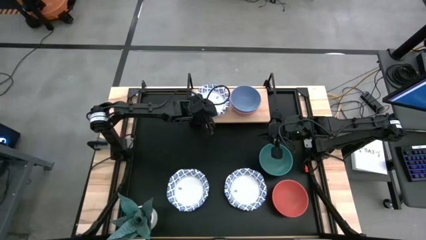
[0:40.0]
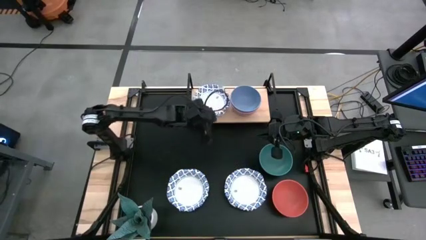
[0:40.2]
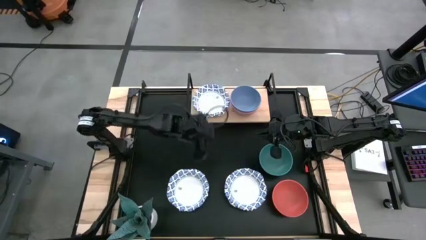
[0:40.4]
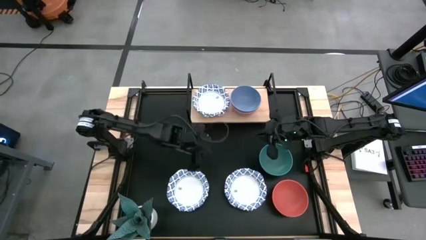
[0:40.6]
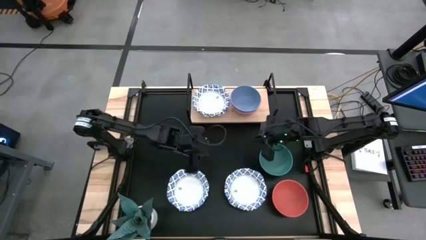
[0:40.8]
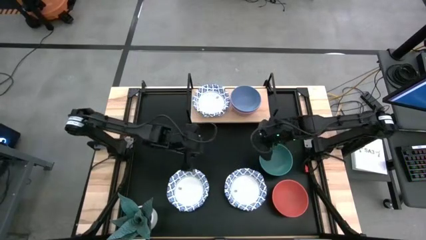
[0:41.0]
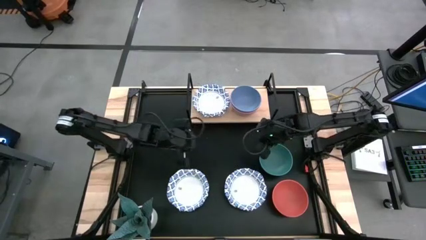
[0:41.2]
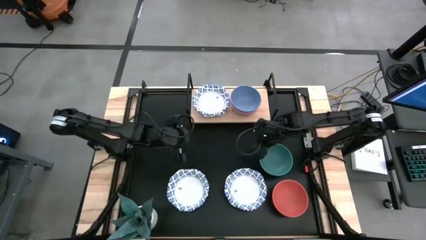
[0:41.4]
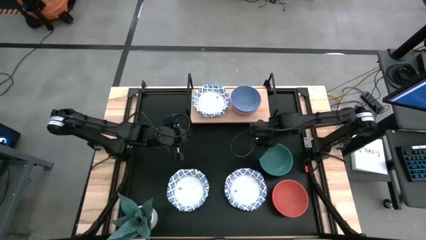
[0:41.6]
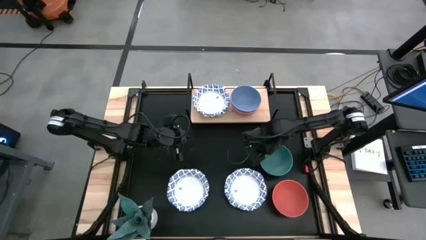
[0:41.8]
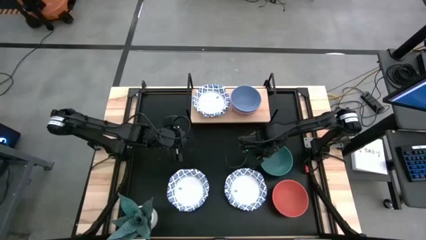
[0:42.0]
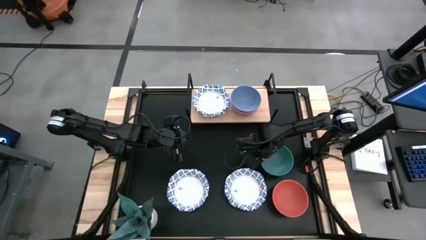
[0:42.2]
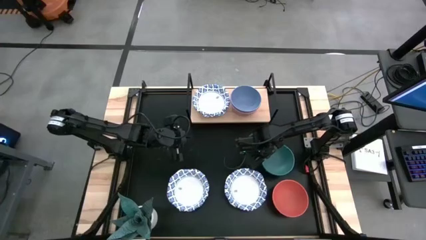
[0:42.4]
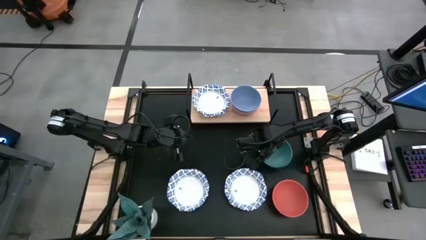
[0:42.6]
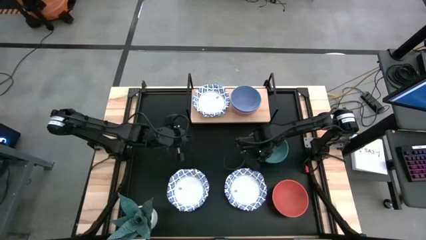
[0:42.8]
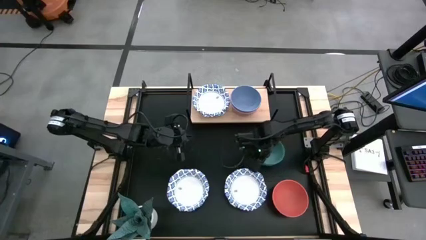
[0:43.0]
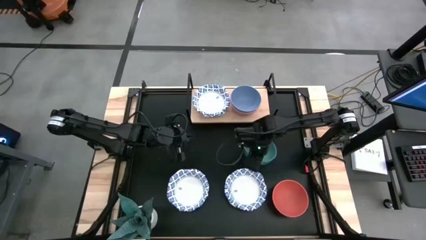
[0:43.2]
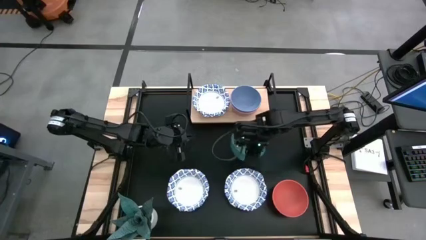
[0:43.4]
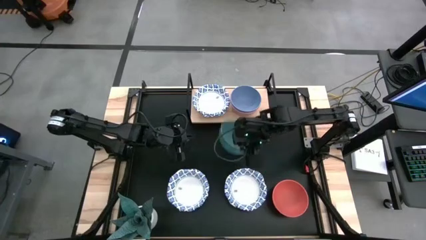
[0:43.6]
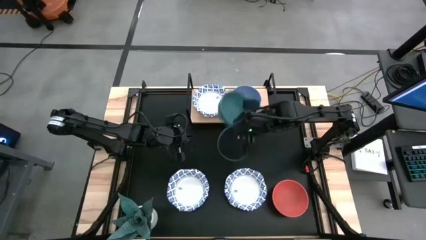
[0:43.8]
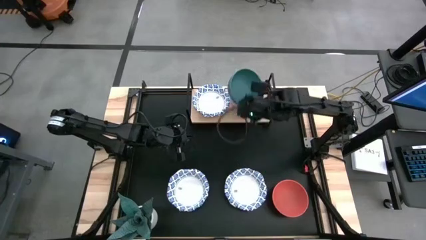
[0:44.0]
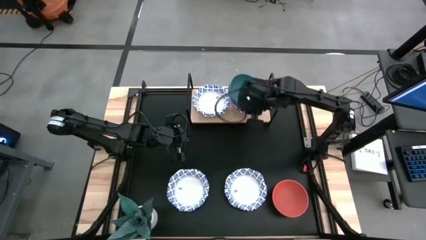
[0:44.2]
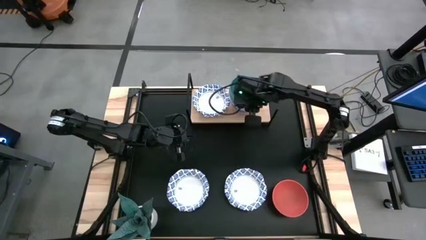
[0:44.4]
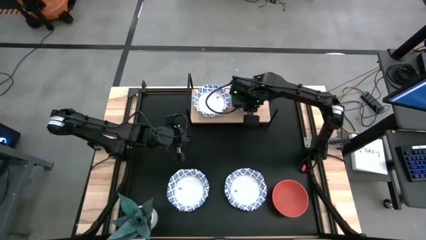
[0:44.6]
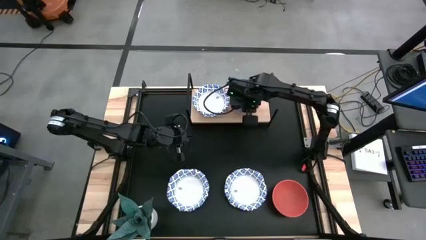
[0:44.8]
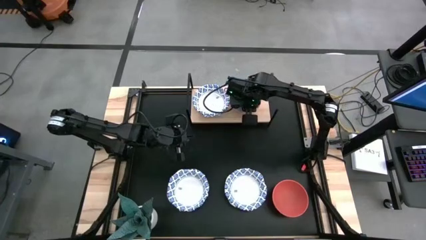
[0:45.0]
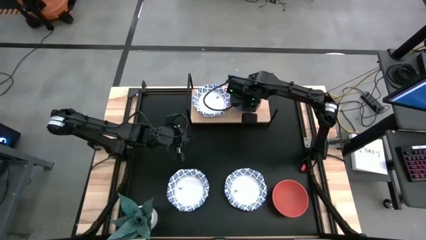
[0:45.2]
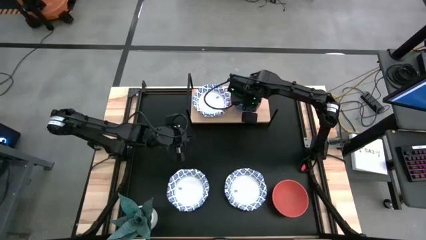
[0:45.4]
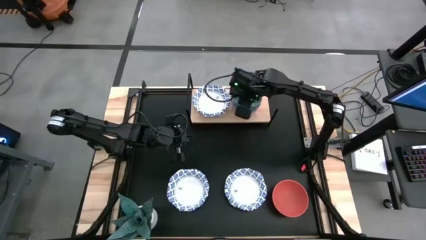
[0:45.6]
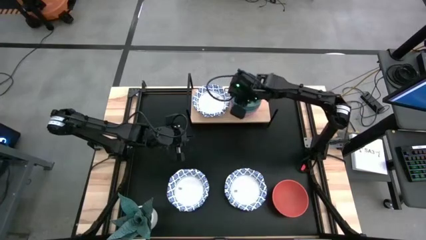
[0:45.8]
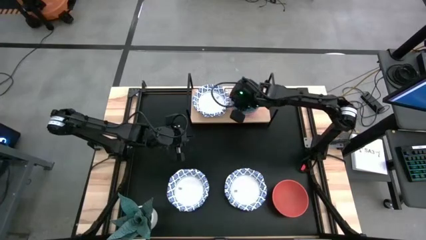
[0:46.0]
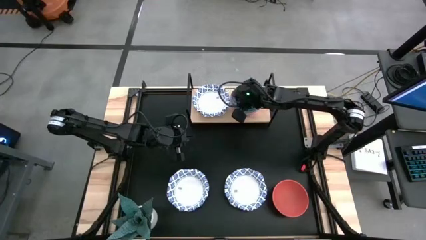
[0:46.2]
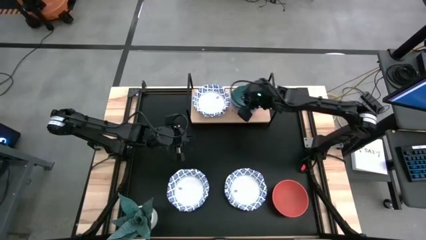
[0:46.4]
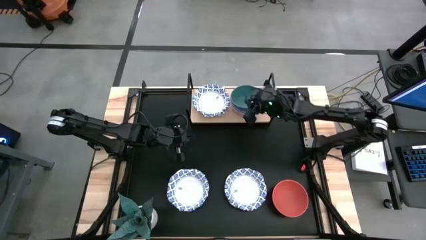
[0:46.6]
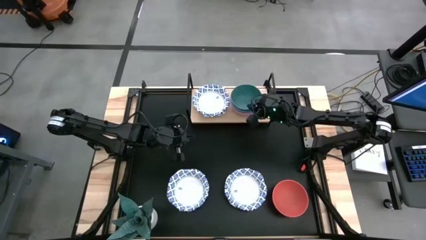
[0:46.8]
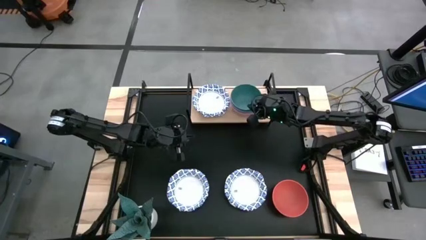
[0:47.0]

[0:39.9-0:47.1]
Task: Place and stack bowls onto a shelf
Stack the green bowl on top of the blue bowl on the shelf

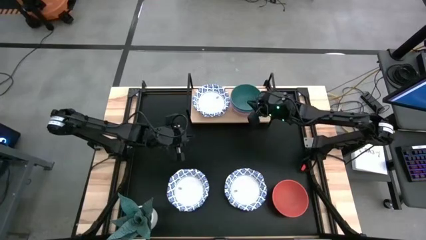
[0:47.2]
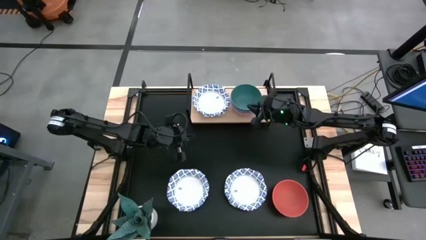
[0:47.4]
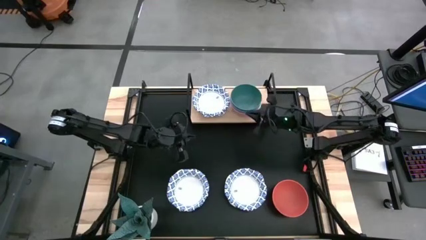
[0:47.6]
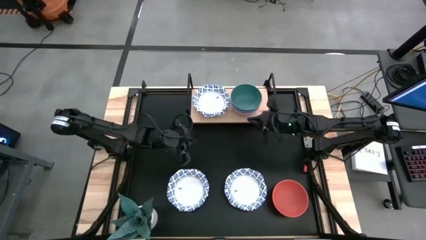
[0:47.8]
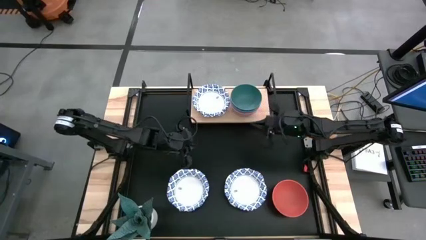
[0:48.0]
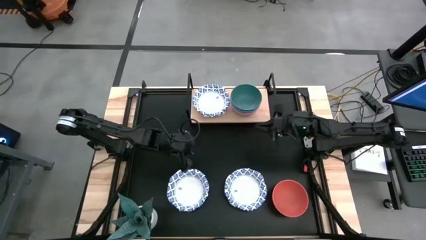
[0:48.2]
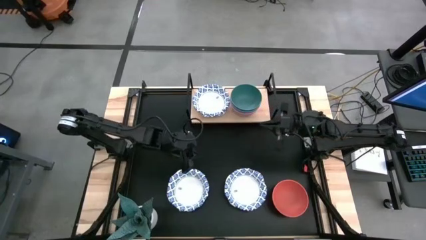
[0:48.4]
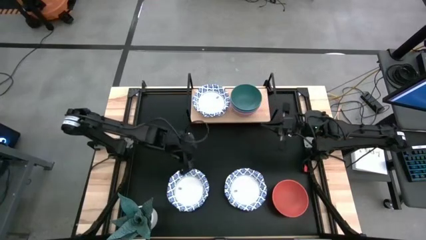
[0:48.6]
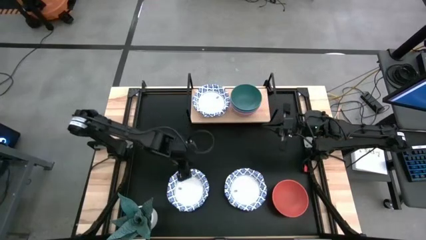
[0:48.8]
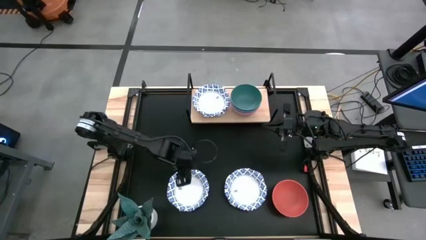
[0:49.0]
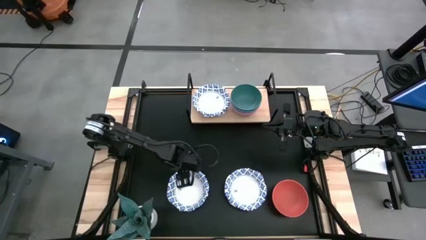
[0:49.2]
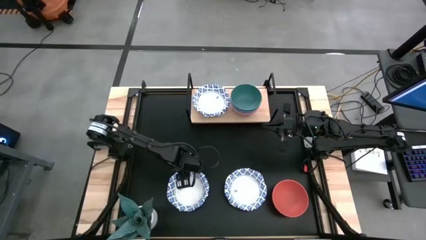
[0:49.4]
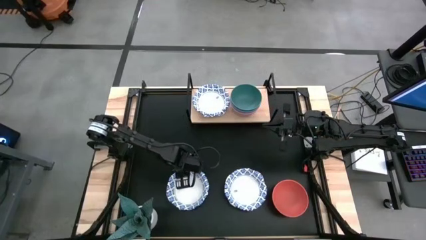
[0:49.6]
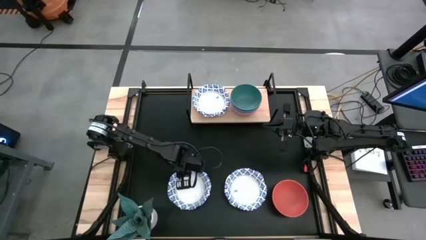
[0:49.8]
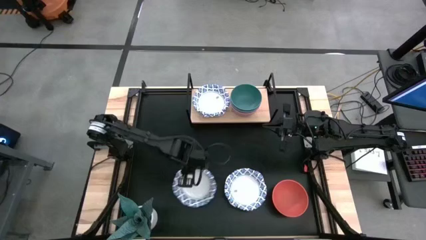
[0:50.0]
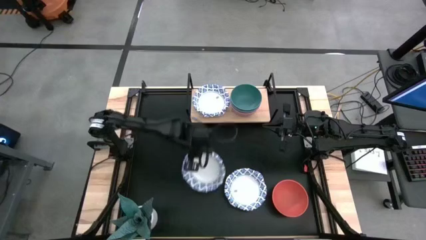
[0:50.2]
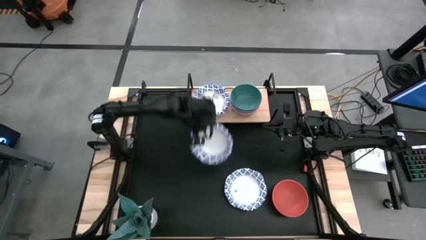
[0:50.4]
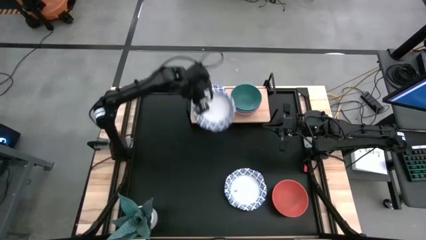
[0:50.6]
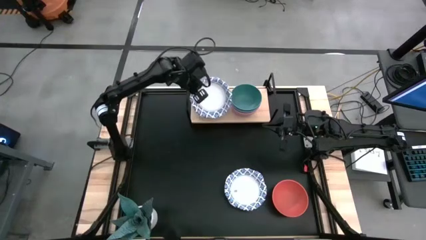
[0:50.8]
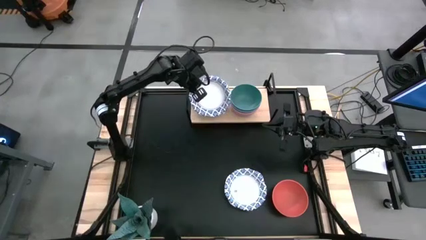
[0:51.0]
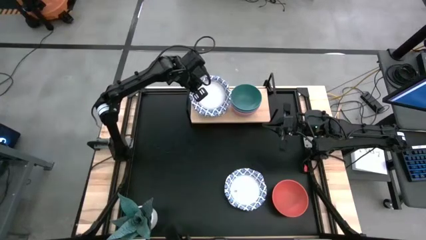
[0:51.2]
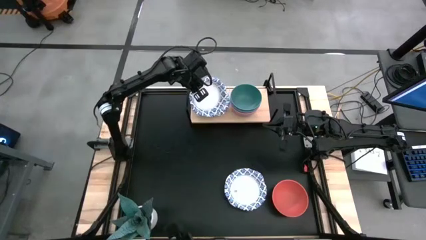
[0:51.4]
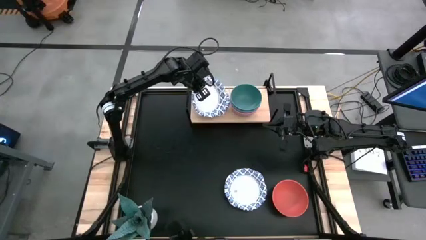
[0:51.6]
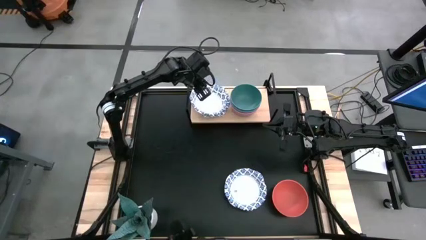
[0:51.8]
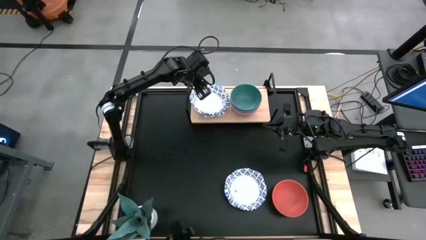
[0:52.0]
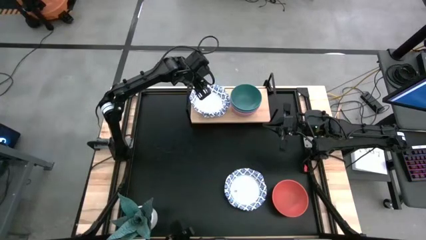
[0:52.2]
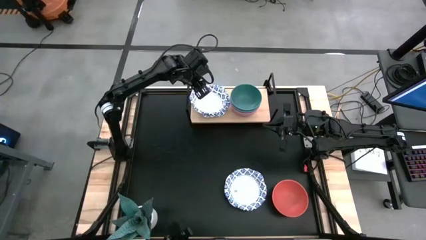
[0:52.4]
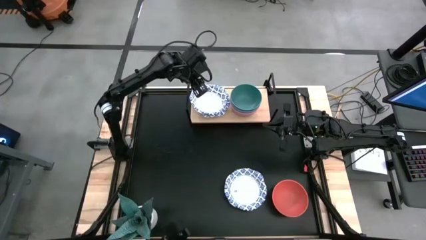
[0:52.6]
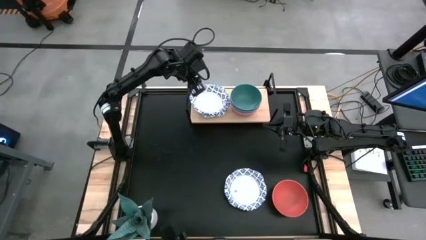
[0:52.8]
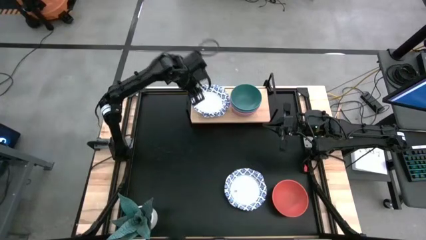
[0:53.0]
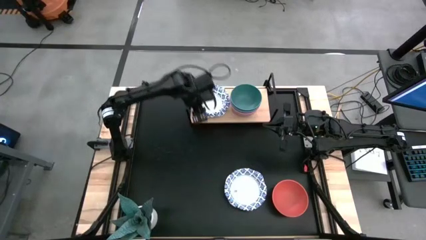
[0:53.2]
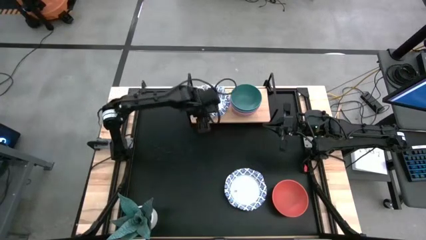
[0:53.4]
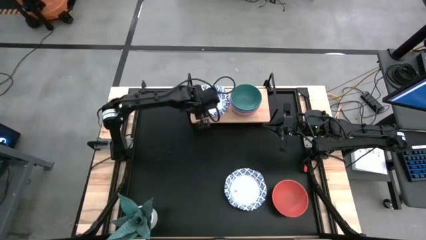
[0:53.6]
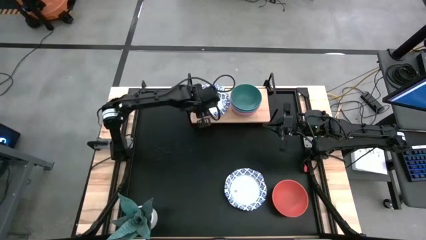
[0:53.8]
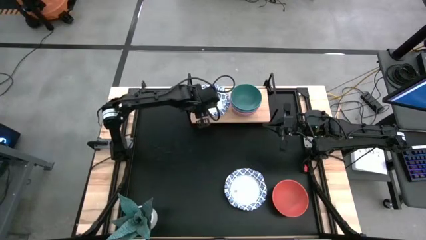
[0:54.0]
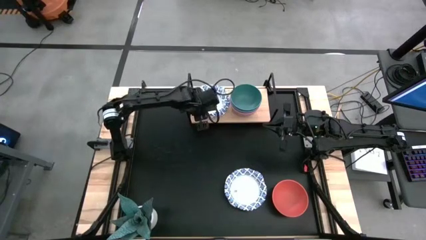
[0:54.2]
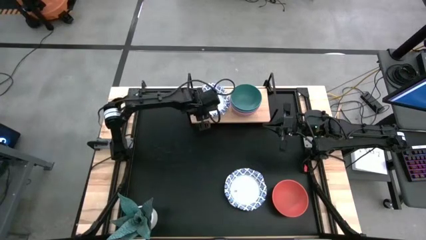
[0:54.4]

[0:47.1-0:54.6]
Stack the white and blue bowl on top of the white and blue bowls on the shelf

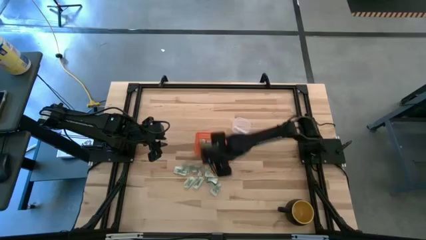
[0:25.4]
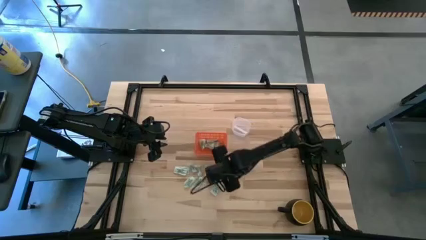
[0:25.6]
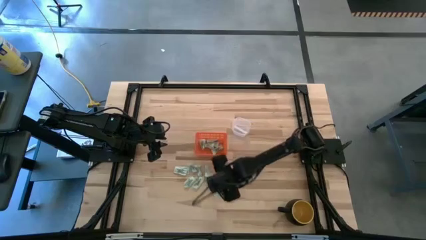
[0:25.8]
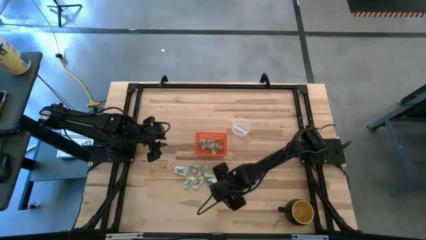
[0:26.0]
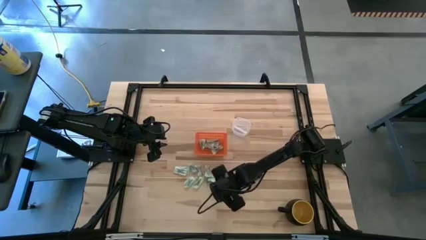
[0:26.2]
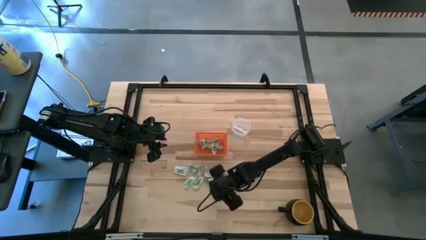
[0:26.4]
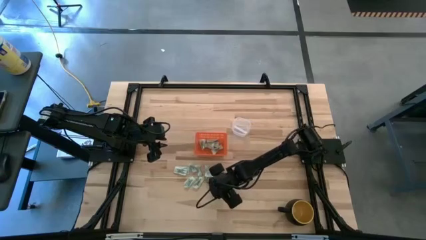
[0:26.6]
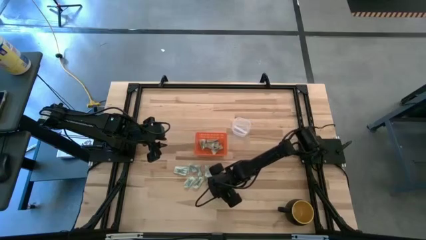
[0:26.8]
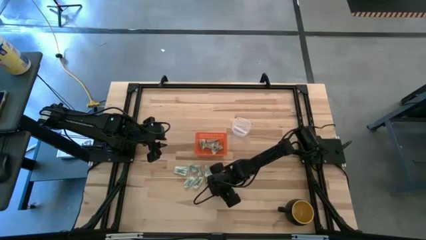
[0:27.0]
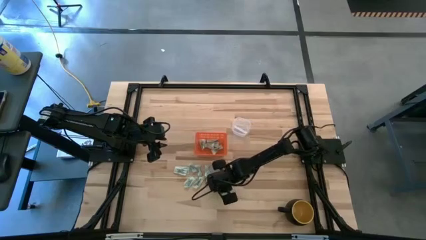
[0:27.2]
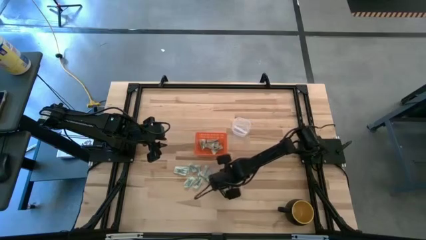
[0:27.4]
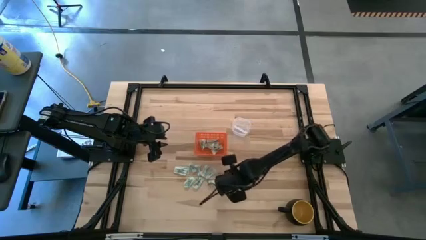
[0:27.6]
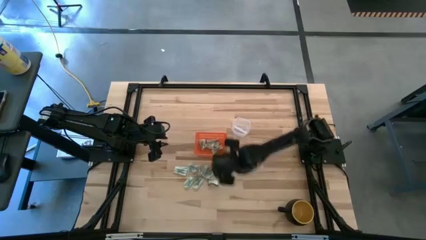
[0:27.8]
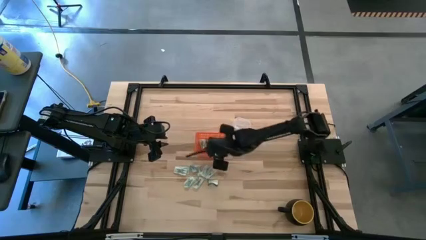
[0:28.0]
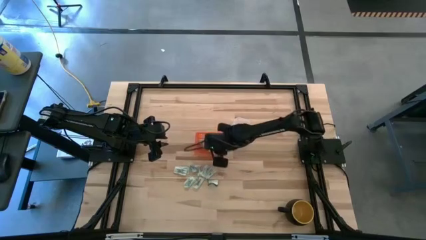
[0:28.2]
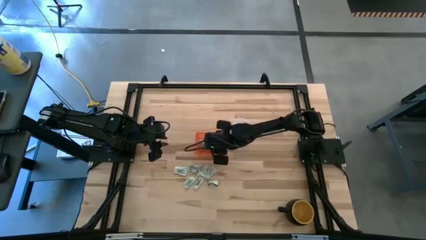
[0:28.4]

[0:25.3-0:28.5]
Task: Pick and place Stevia / Truvia into bins
Put the stevia packet into the basket
